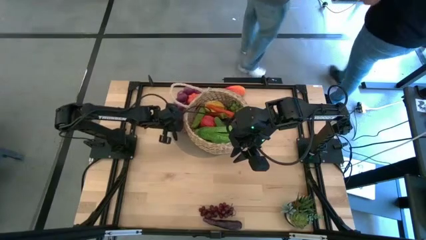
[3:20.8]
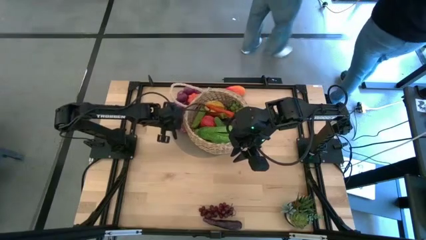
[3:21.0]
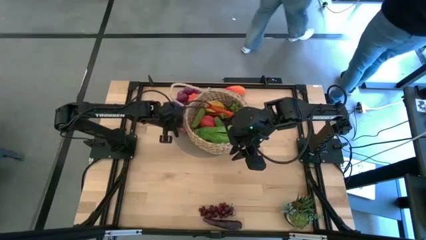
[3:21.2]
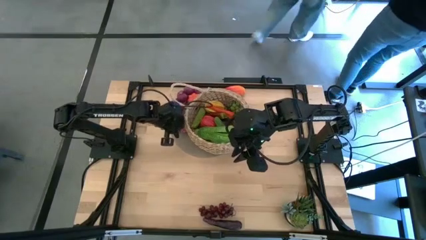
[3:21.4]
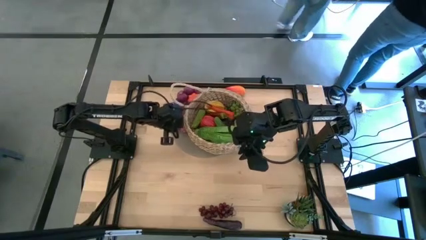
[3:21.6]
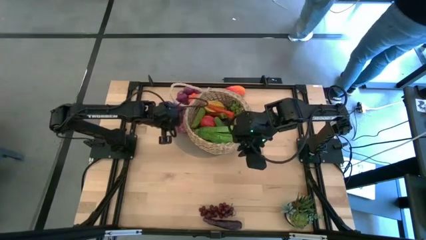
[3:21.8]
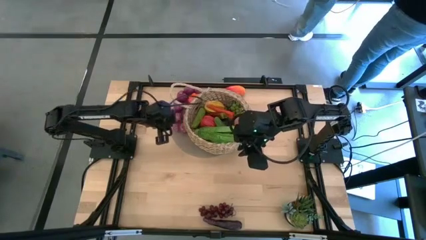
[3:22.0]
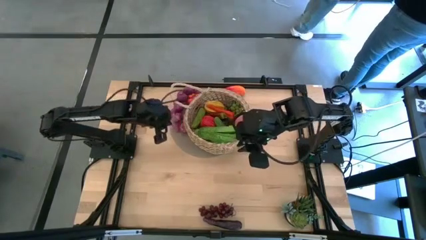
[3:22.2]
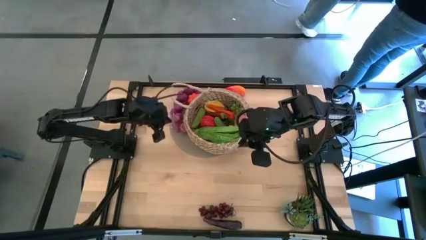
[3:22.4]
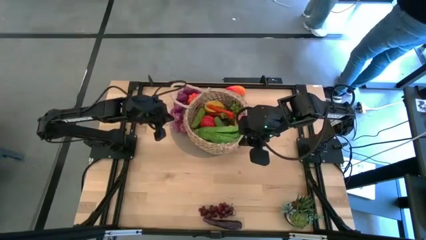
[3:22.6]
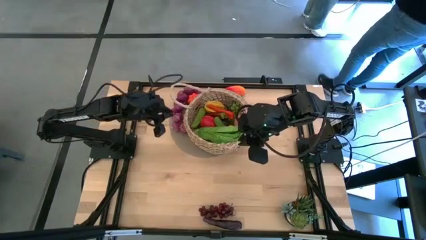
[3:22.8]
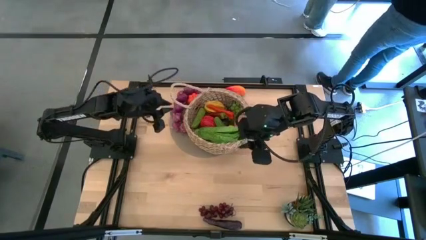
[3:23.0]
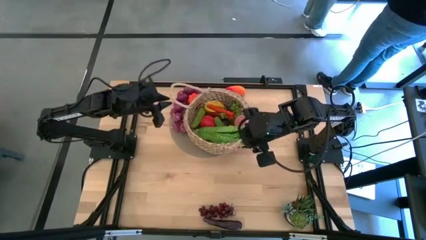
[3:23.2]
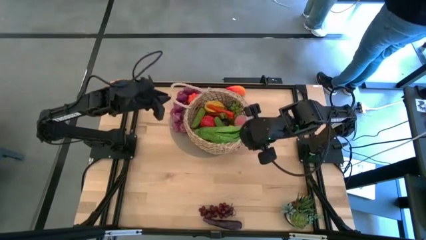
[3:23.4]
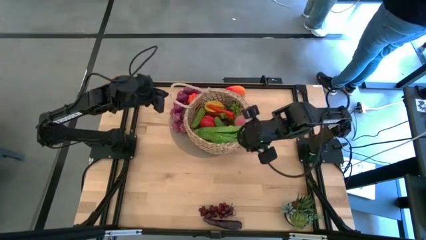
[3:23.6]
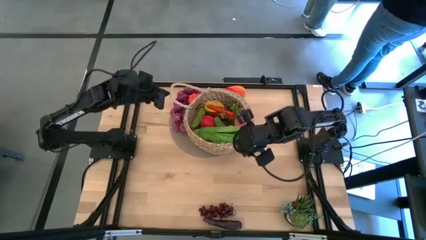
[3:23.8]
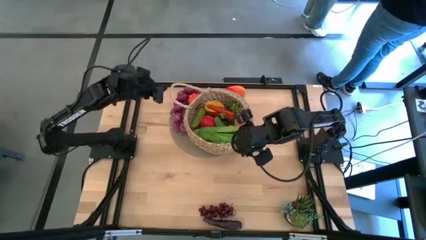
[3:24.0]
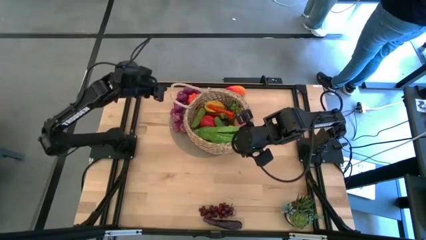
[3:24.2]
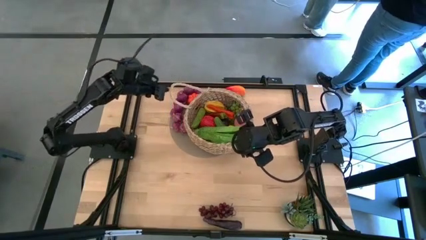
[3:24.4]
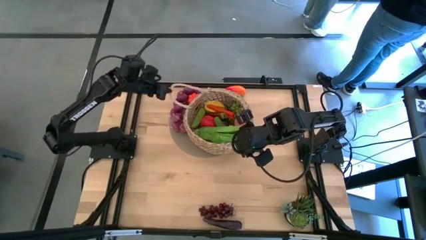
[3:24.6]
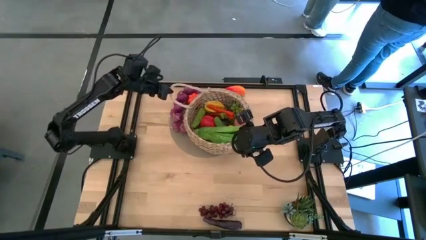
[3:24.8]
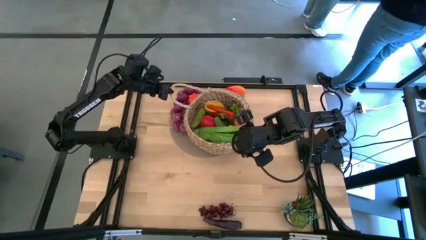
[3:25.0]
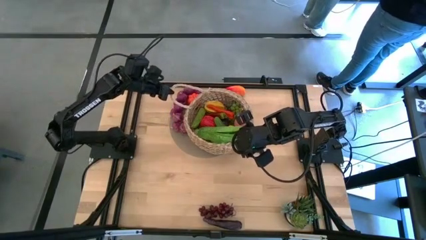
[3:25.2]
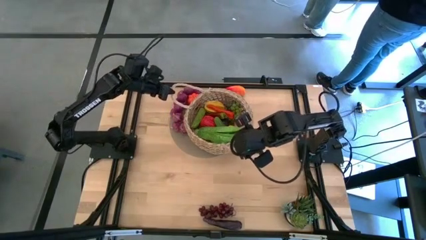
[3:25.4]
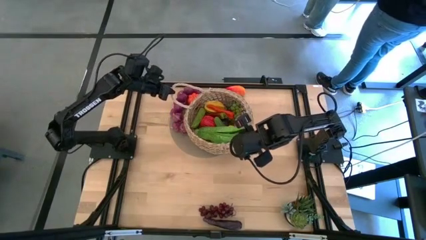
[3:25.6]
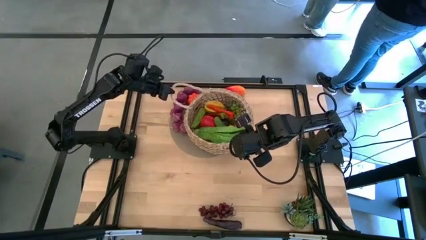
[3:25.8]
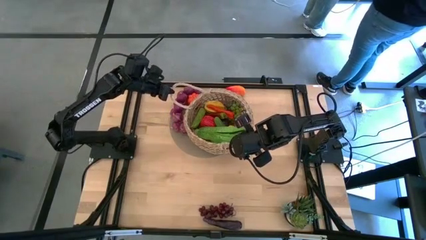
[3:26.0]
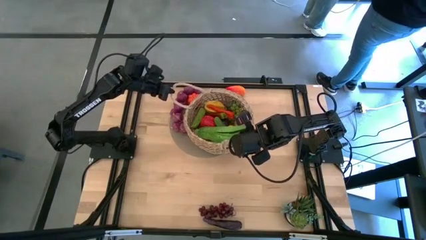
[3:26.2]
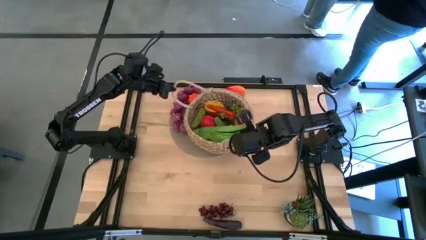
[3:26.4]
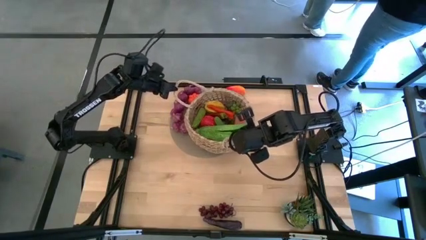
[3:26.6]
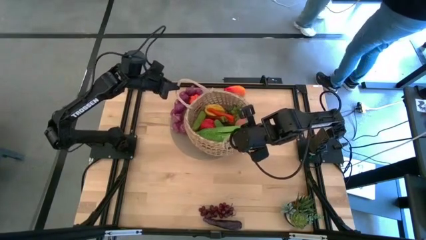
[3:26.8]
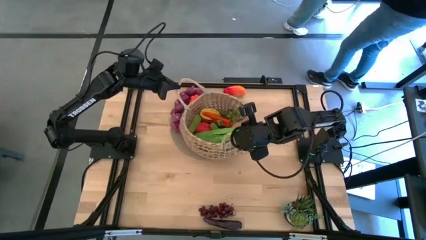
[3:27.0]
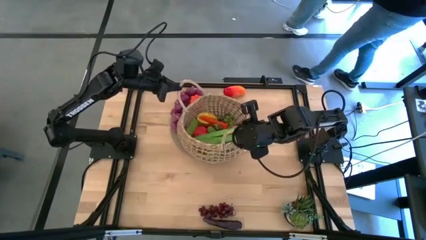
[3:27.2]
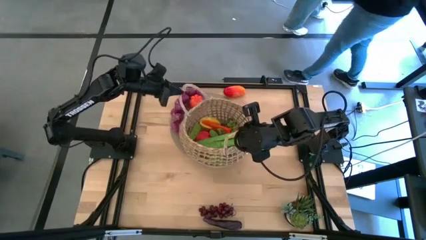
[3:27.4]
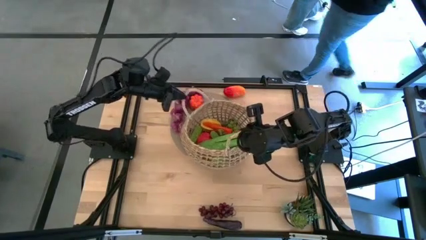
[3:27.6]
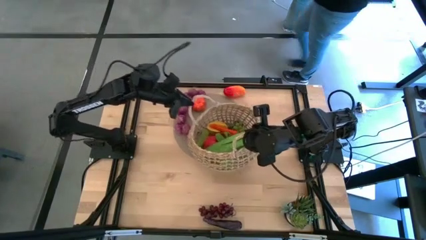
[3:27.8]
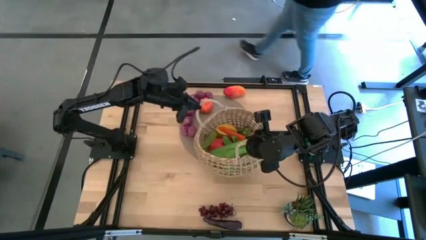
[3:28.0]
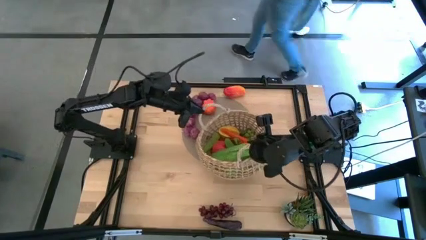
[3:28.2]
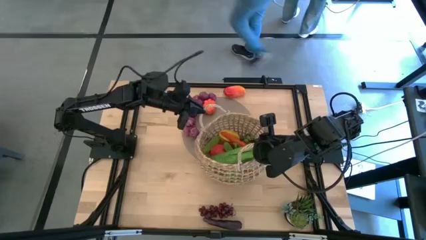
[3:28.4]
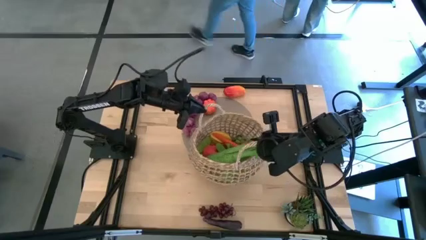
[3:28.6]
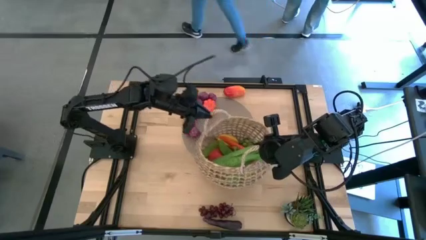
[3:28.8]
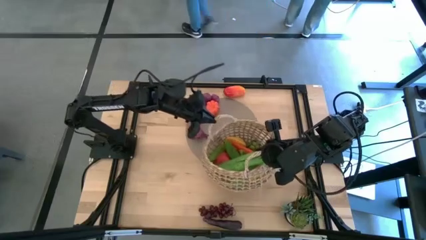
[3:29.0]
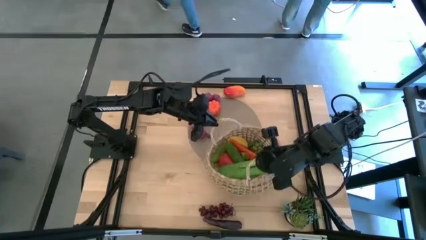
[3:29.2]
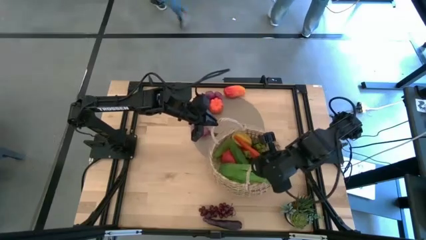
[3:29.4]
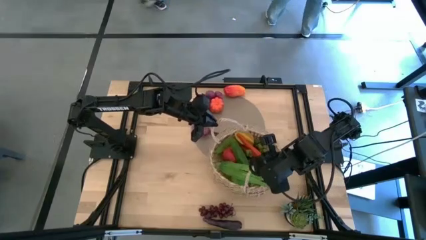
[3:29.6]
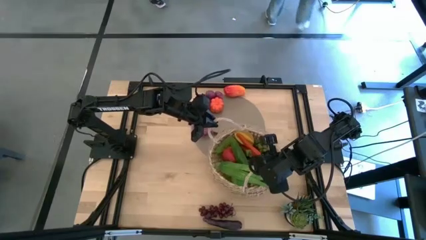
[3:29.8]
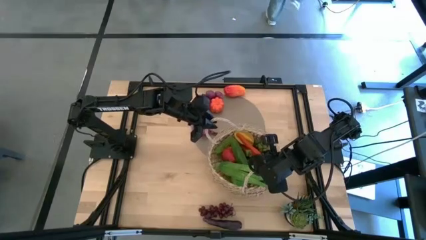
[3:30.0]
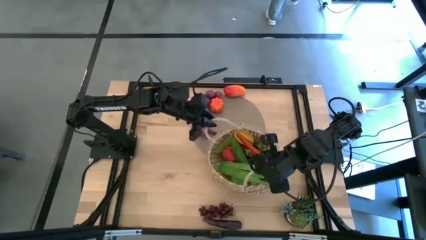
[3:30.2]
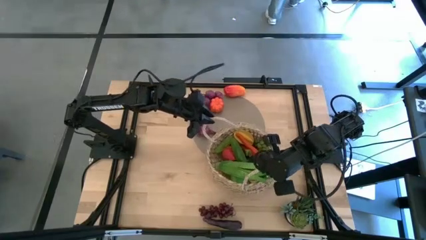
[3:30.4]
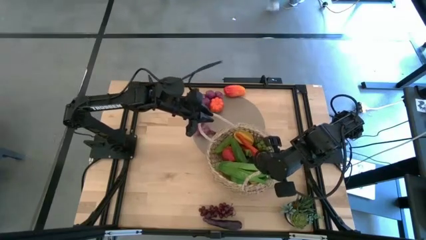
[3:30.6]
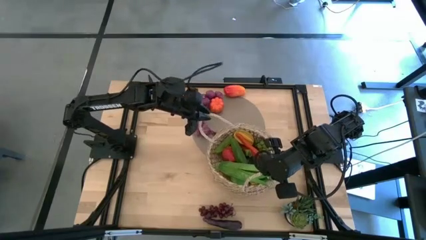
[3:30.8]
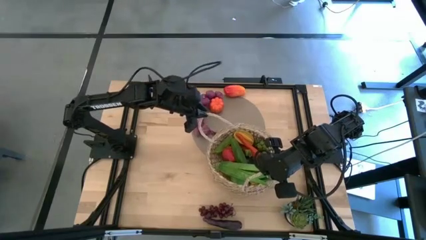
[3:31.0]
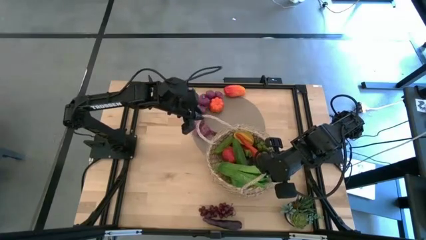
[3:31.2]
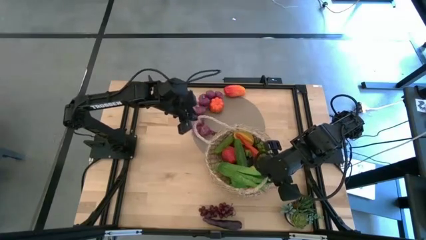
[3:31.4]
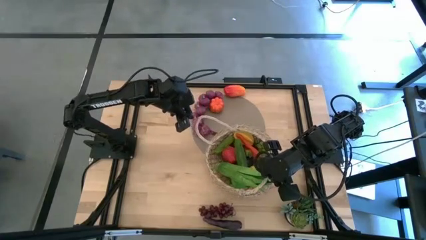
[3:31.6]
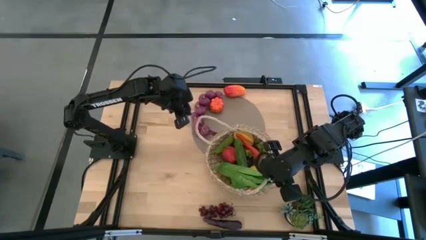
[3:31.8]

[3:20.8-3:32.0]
Task: Build produce basket
Adjust the brown basket
